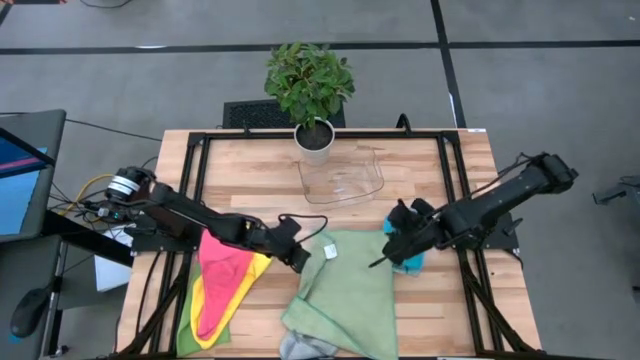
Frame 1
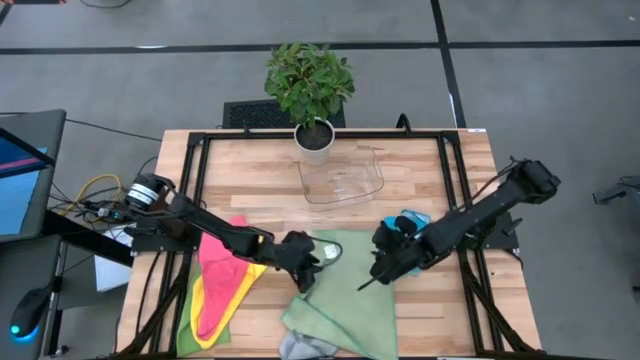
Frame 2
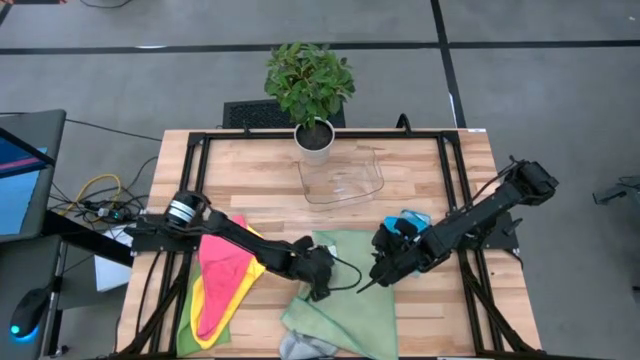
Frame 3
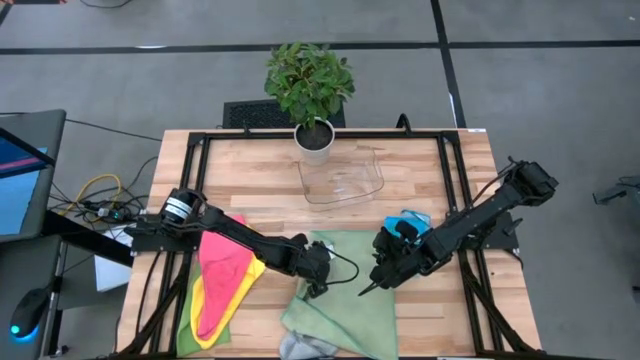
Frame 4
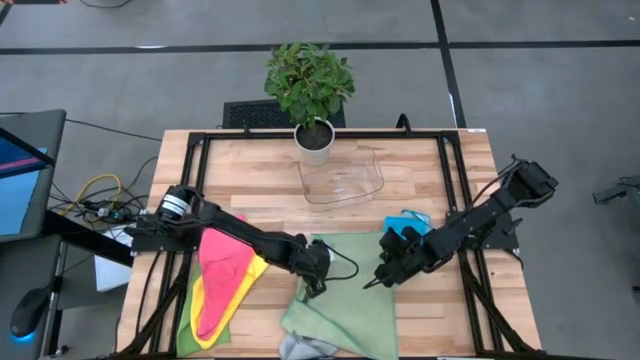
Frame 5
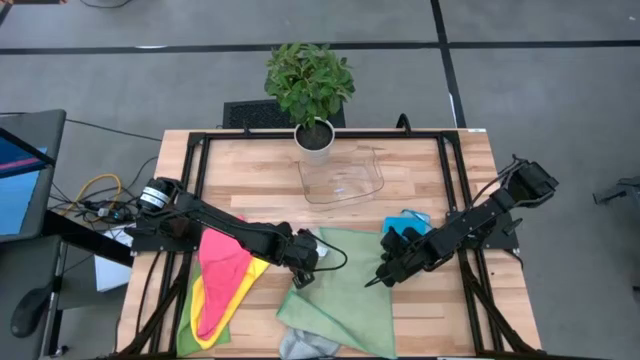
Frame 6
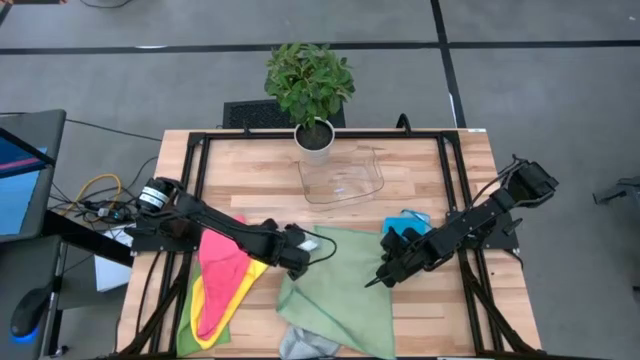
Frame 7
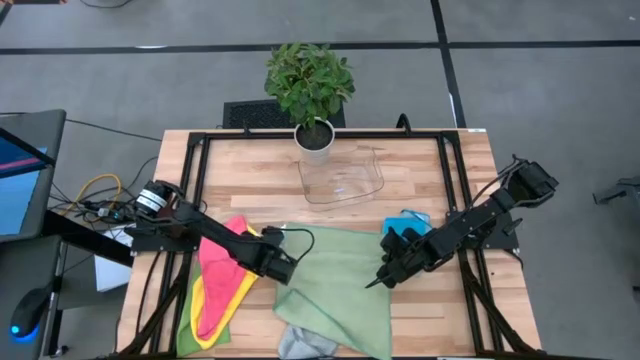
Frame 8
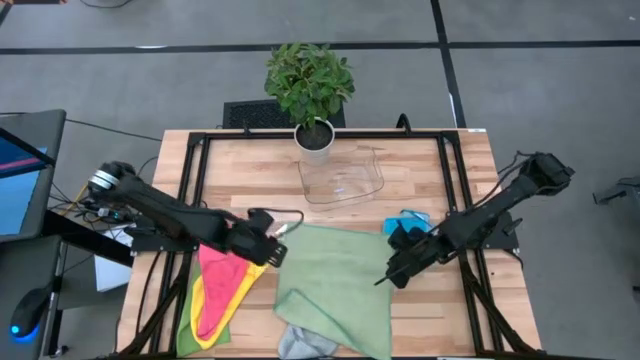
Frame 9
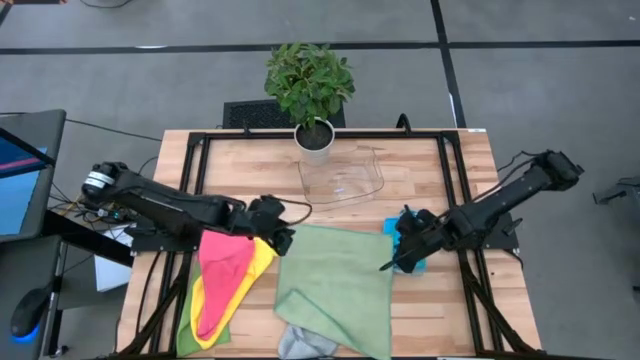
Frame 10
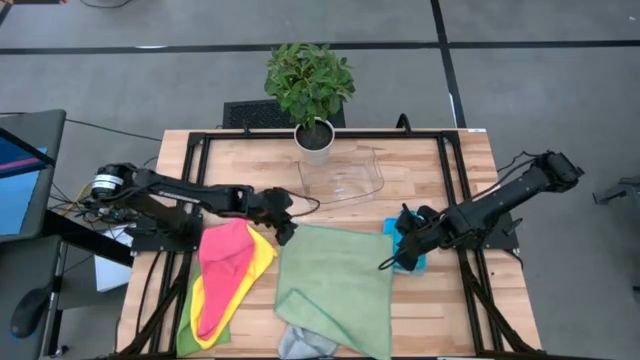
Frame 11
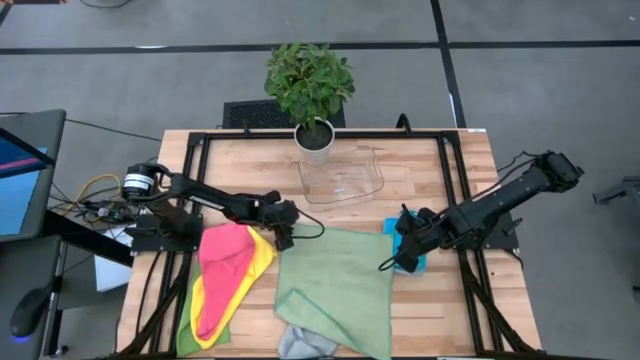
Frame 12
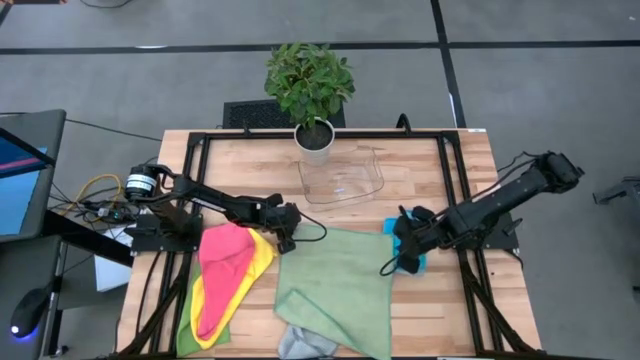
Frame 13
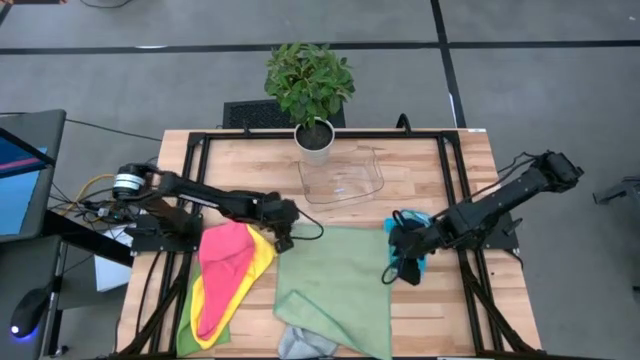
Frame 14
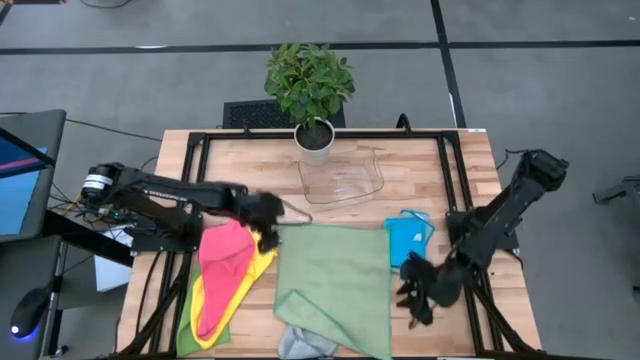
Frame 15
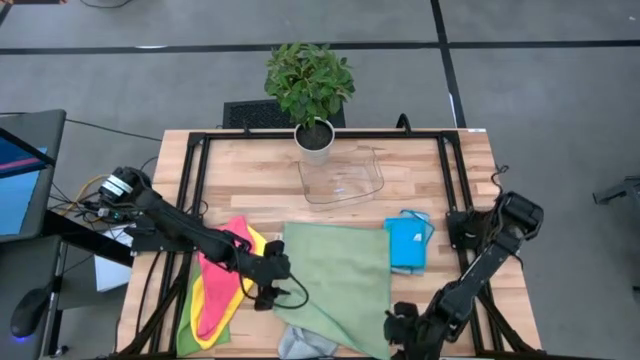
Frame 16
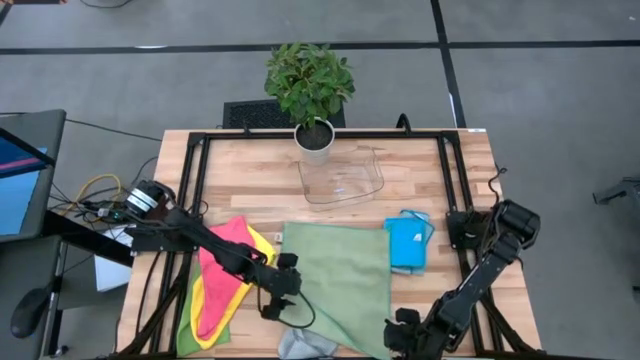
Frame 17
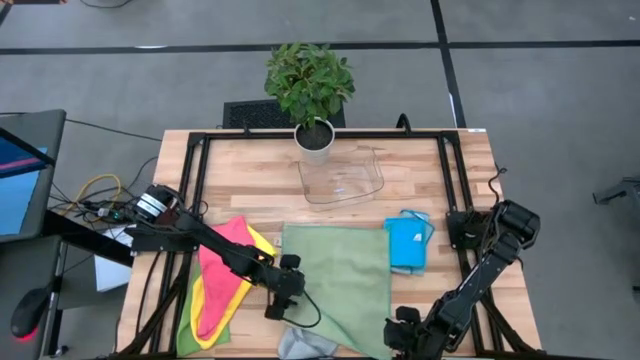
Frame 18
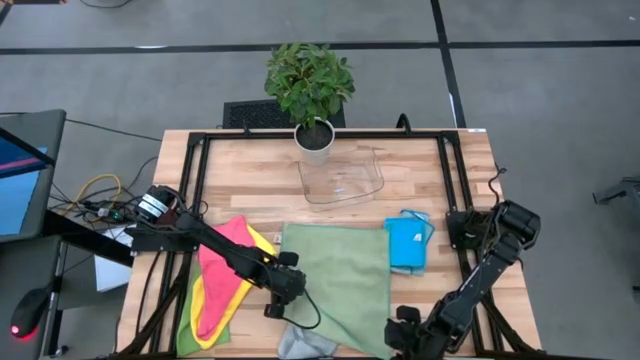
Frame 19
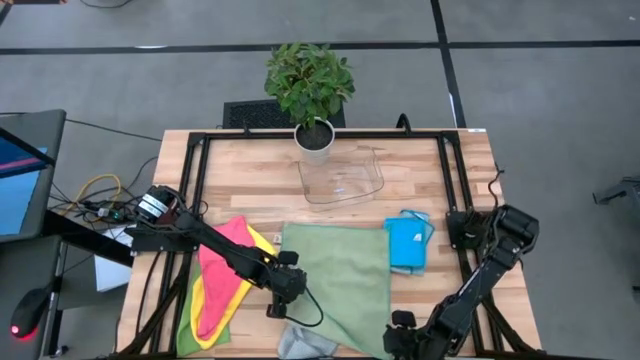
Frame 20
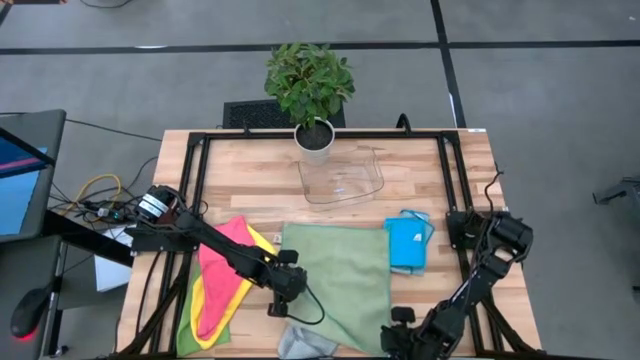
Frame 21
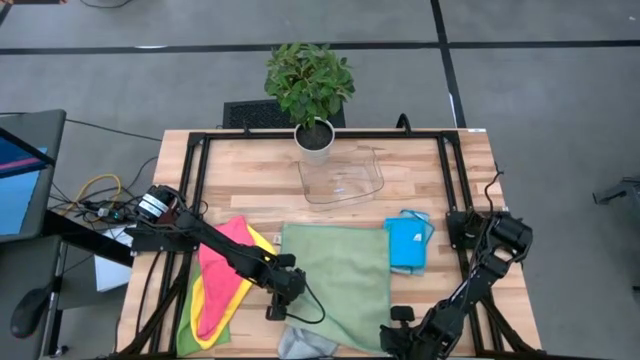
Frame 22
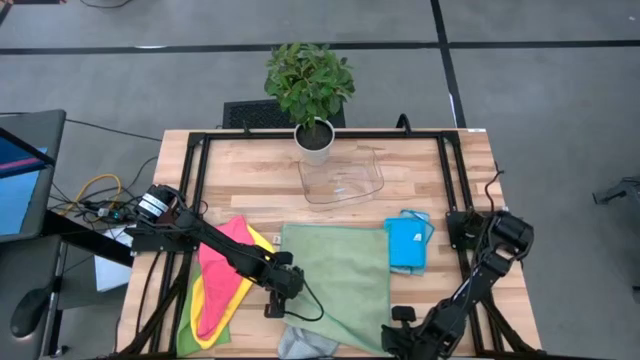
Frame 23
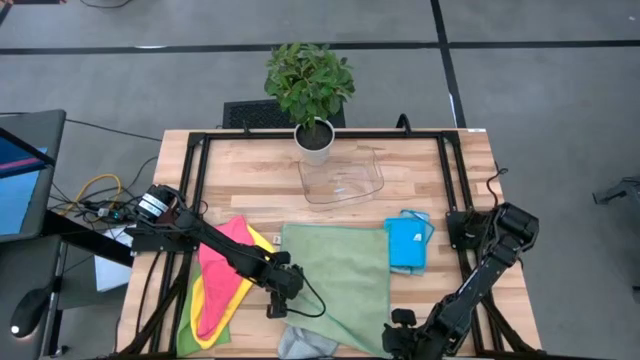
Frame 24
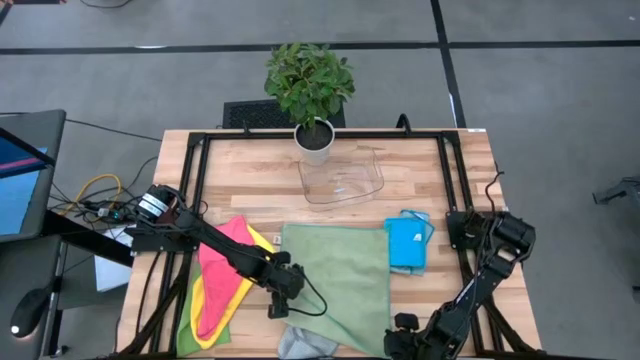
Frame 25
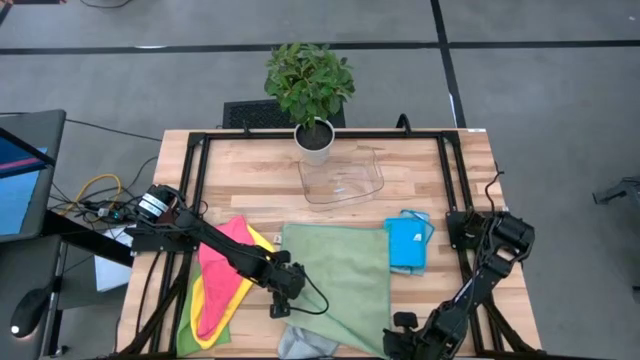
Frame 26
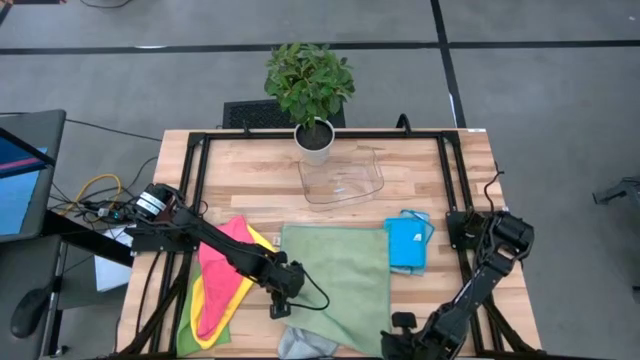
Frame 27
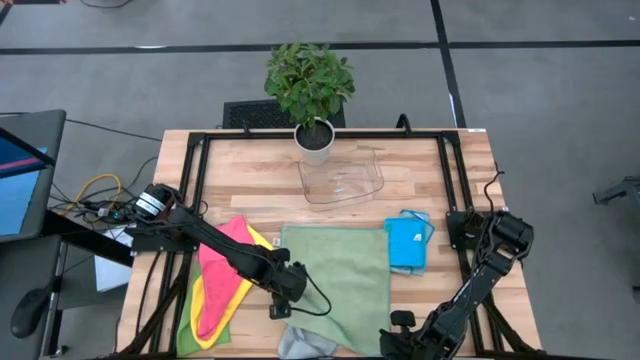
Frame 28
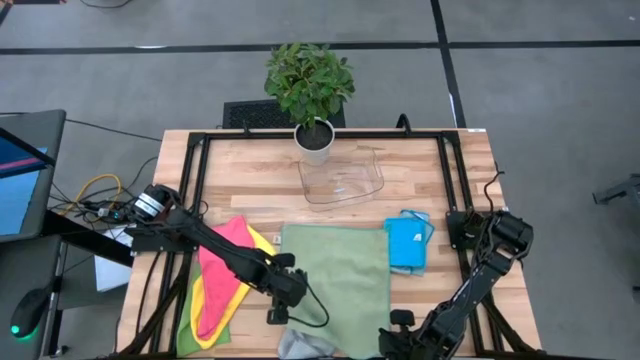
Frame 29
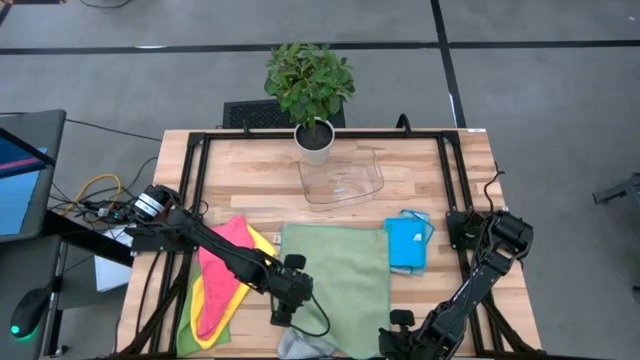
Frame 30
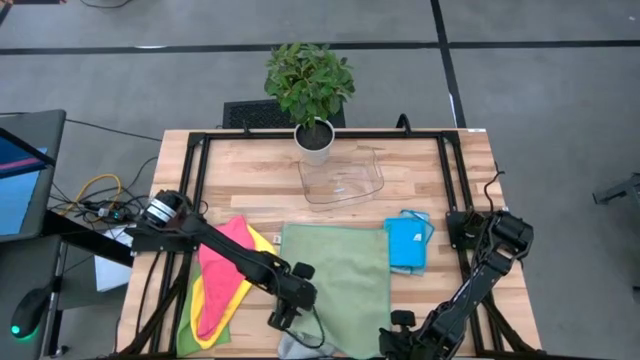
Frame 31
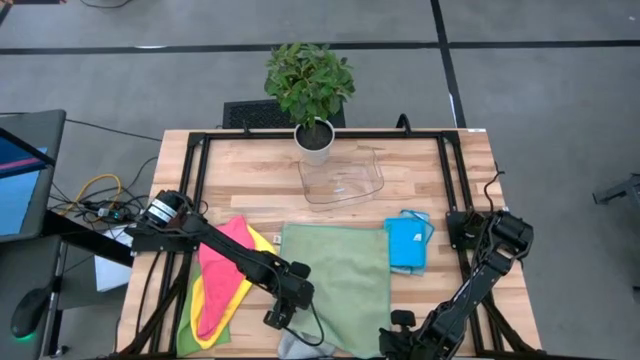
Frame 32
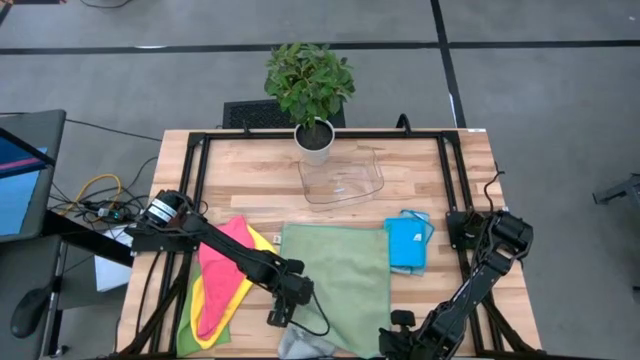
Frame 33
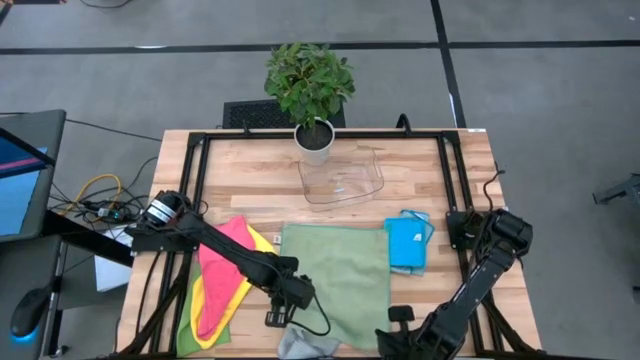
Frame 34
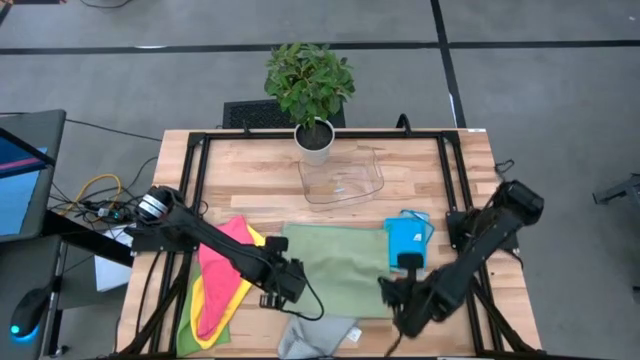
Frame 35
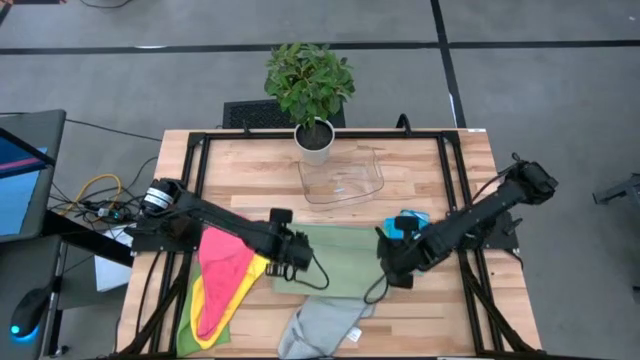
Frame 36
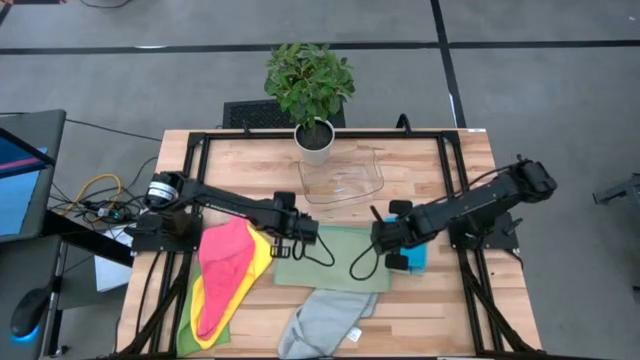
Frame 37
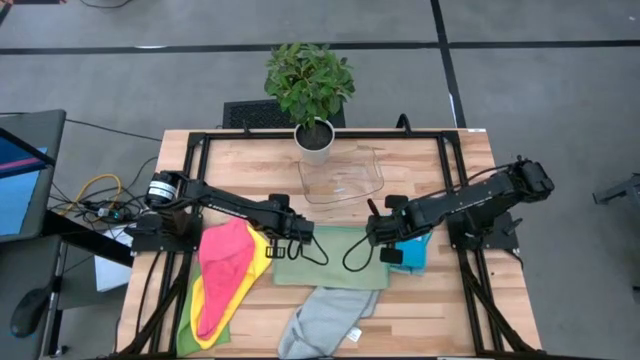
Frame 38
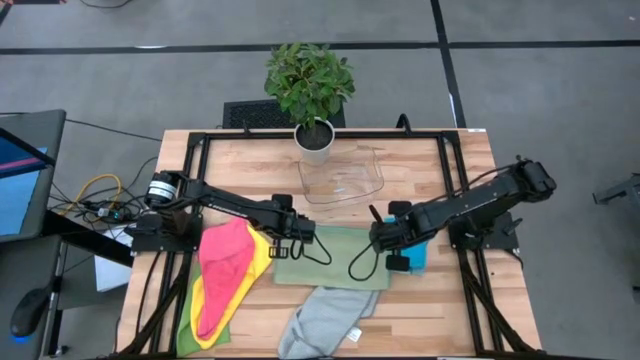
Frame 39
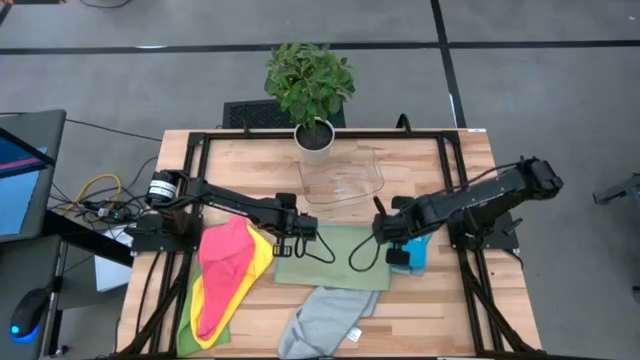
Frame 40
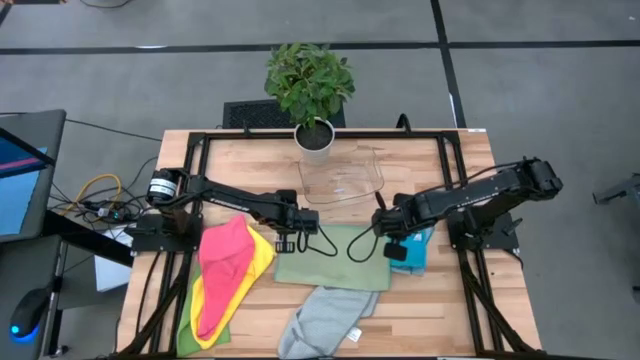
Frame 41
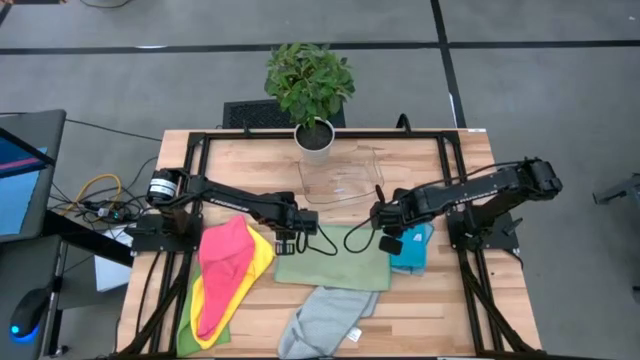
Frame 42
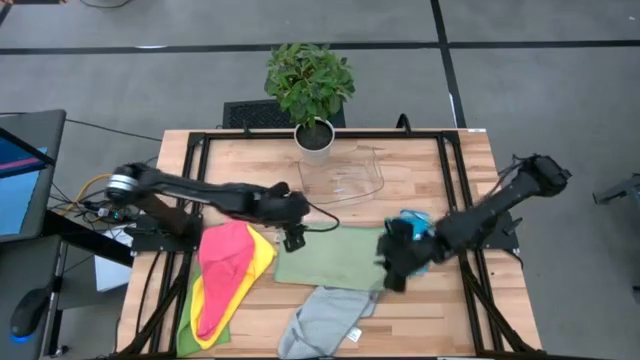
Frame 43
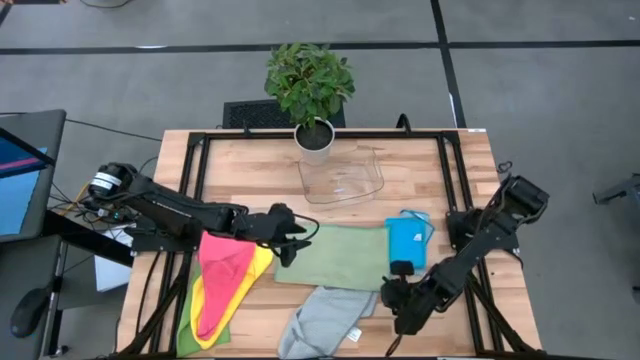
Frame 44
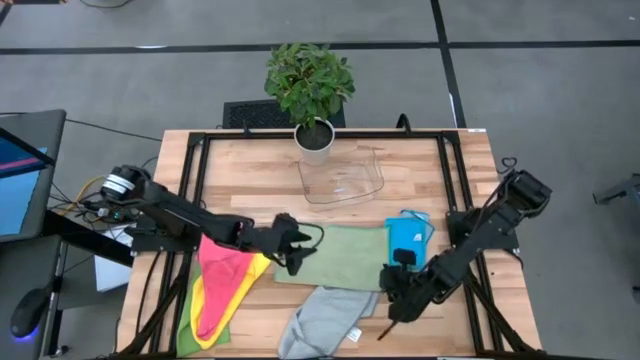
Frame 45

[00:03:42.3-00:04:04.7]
Task: Fold microfiber towels
Fold the light green microfiber cloth
